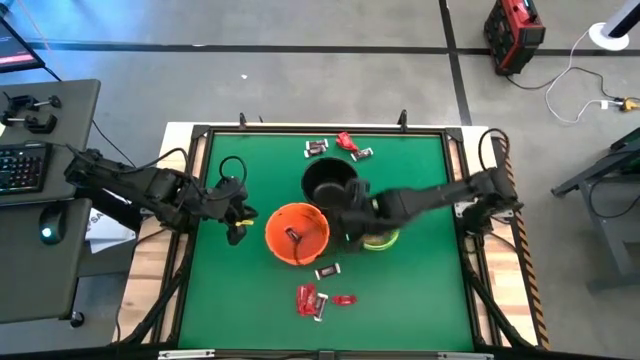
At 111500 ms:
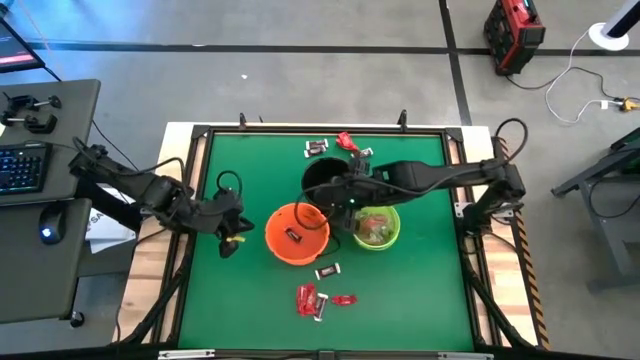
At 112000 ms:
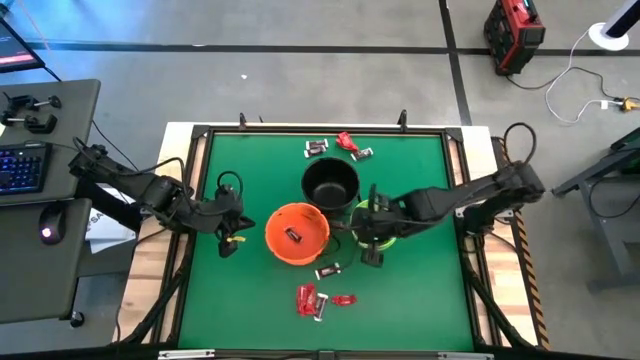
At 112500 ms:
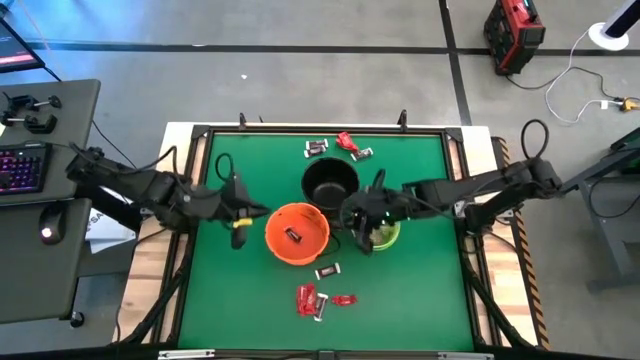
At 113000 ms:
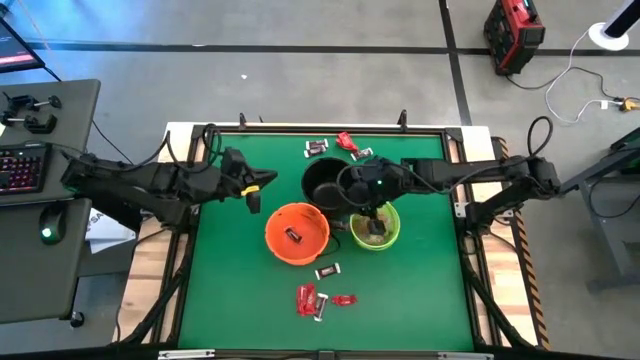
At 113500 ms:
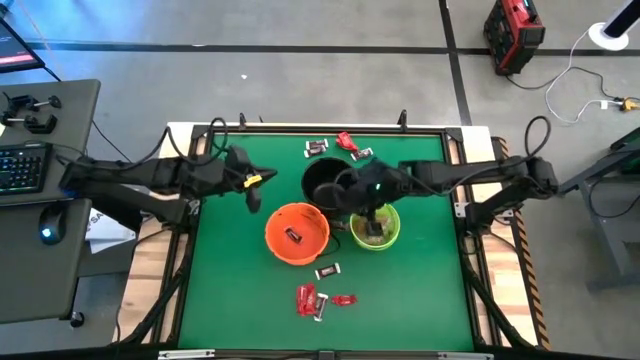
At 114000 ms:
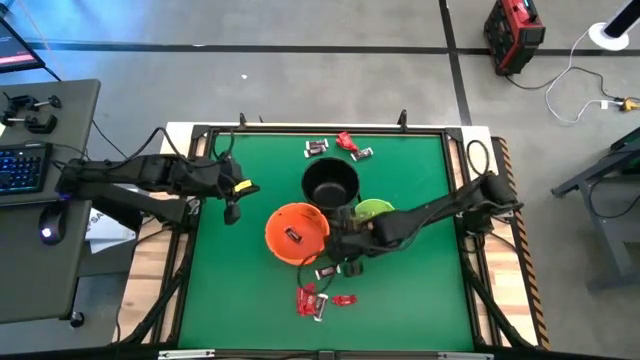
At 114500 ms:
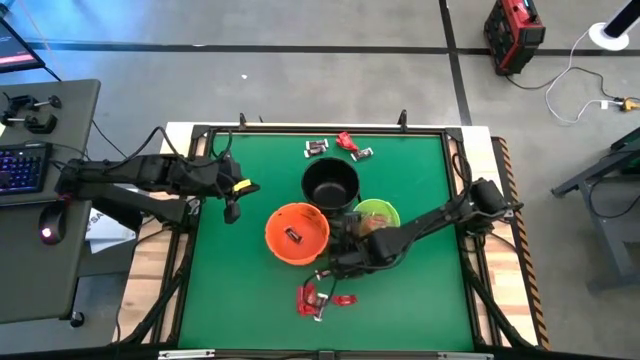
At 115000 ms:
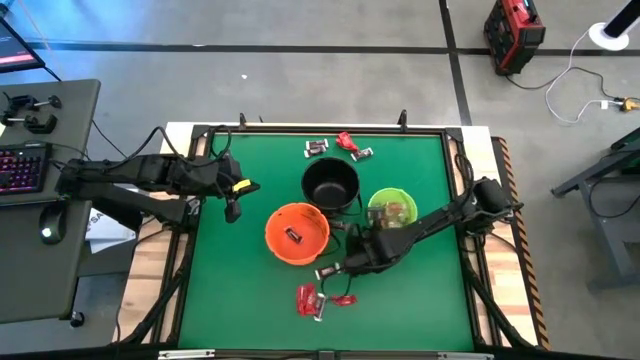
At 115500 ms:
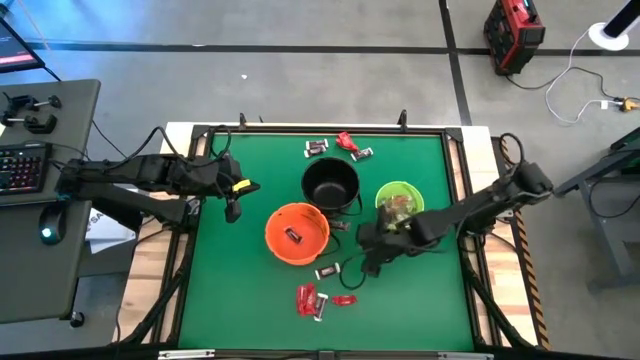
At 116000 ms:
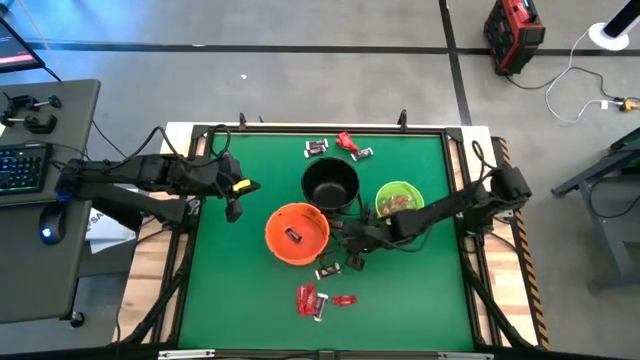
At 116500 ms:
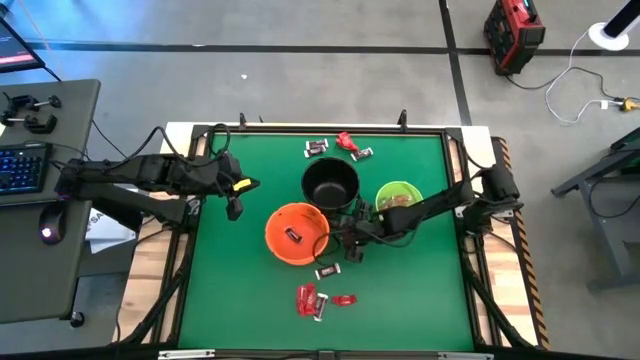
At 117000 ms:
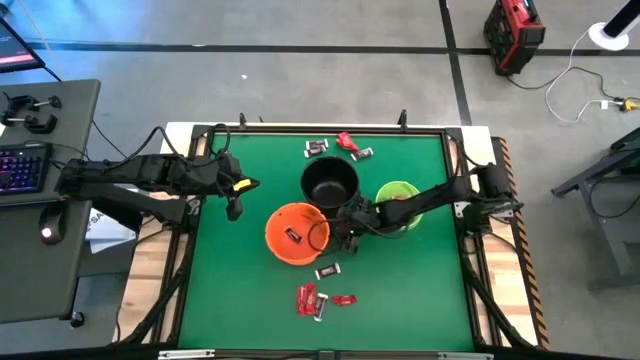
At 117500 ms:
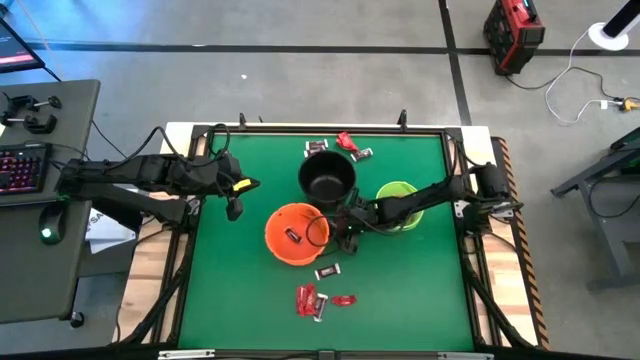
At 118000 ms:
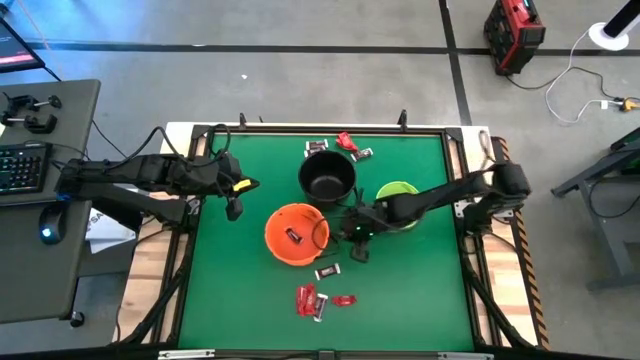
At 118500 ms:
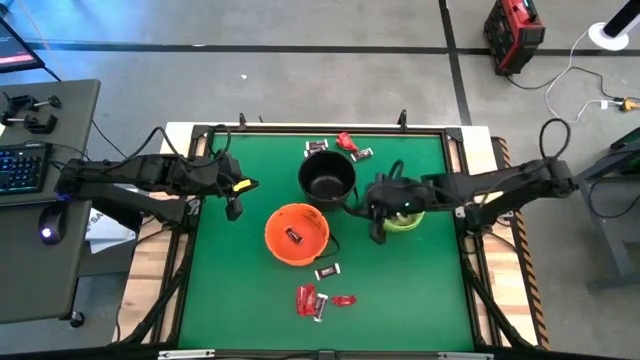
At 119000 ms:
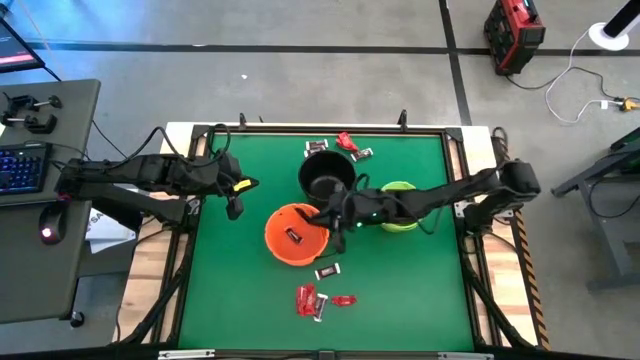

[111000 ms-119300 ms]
Task: Sort candy by brand, put in halloween buckets
Put the brown chocolate bar into orange bucket

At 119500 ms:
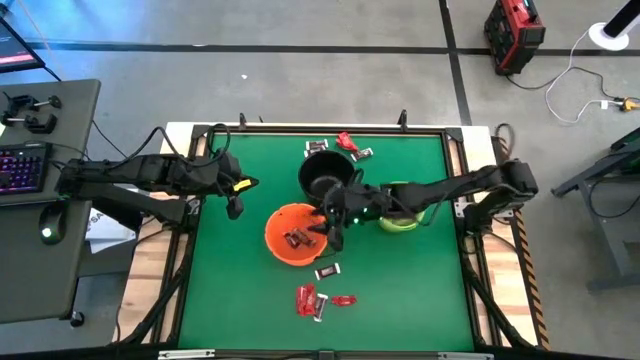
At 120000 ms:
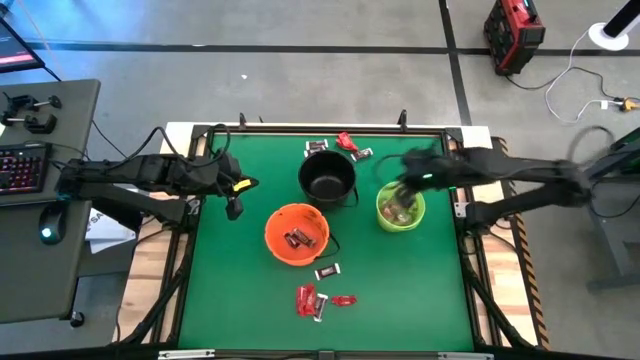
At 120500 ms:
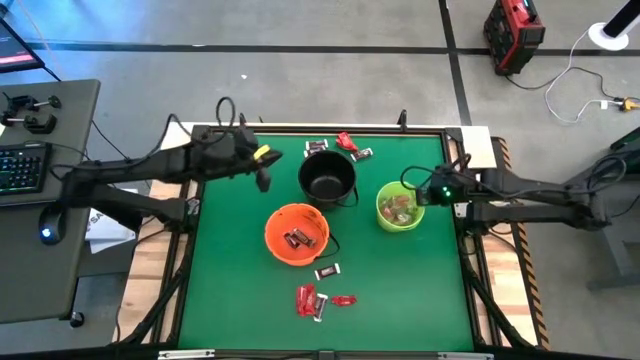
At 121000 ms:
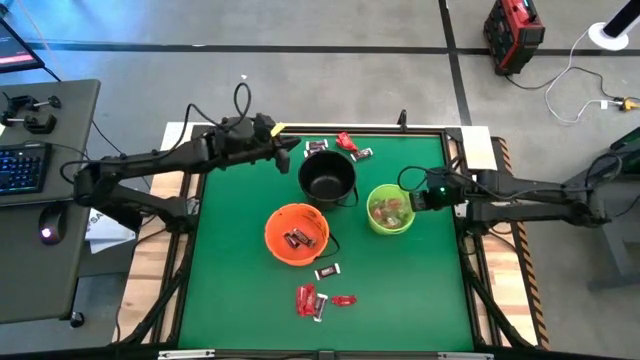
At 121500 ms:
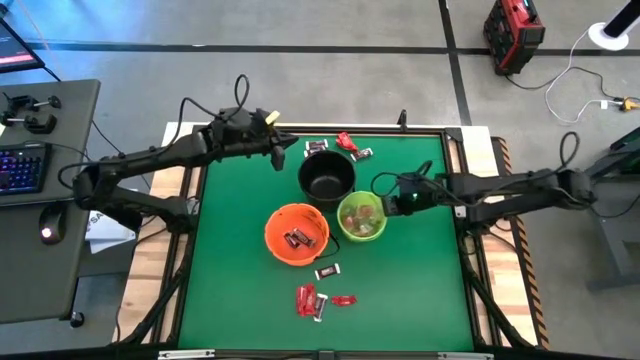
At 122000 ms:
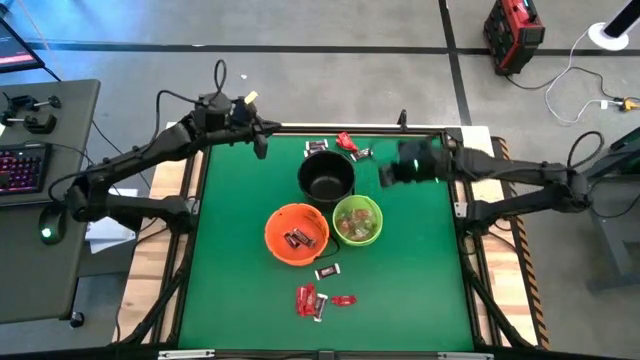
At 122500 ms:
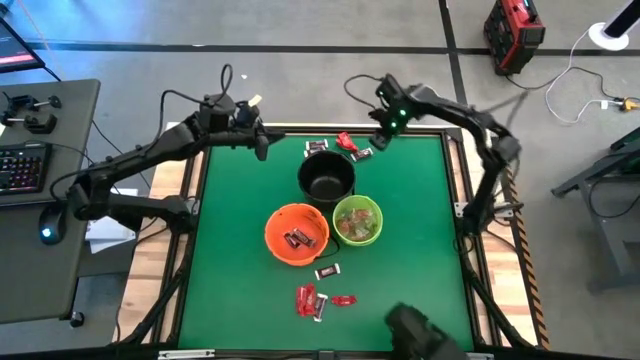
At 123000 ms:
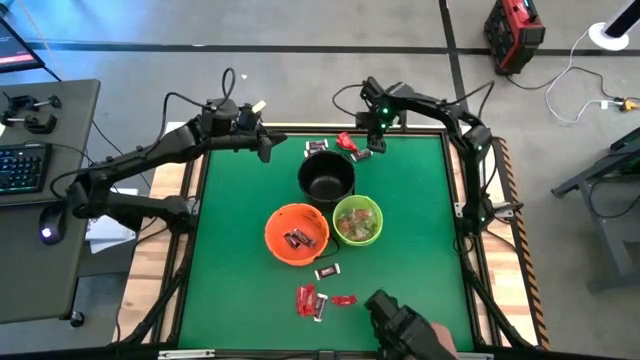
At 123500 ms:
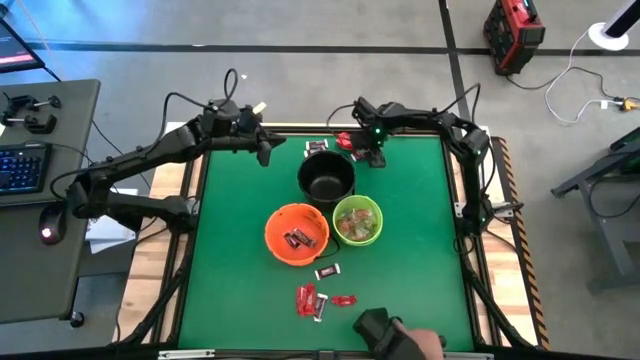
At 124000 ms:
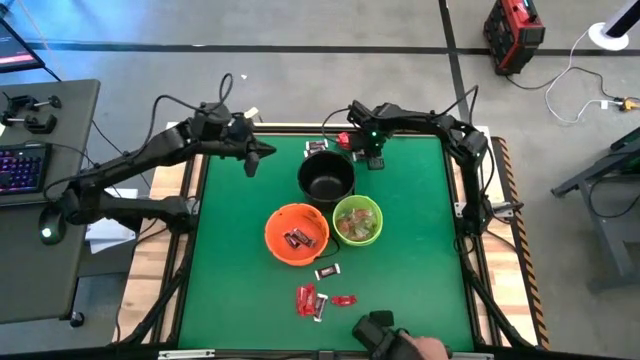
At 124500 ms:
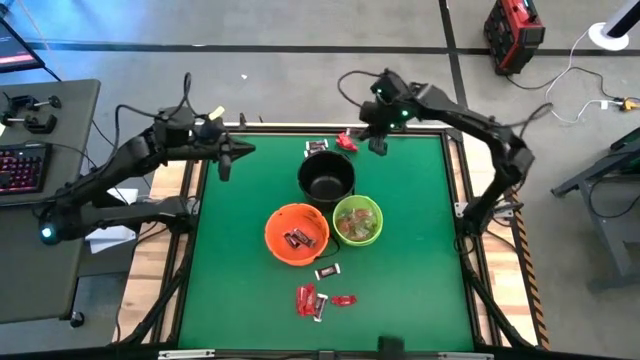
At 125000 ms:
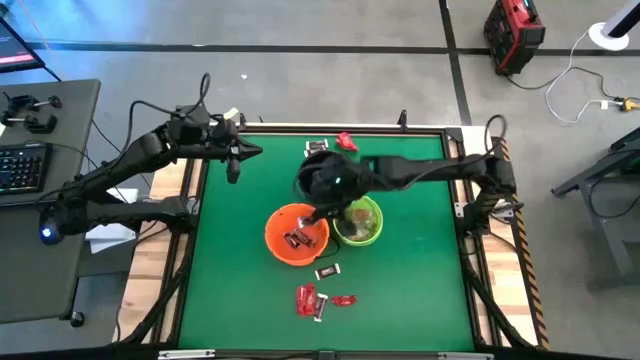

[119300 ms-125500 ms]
Put the brown chocolate bar into orange bucket

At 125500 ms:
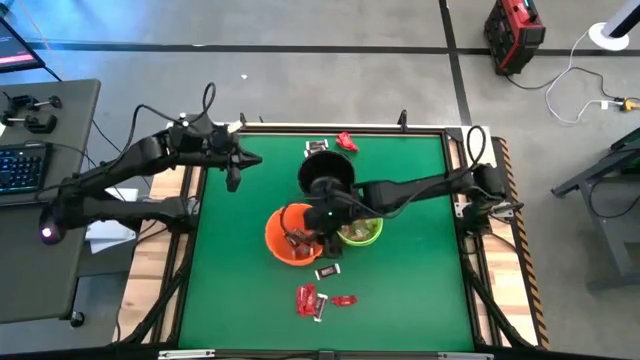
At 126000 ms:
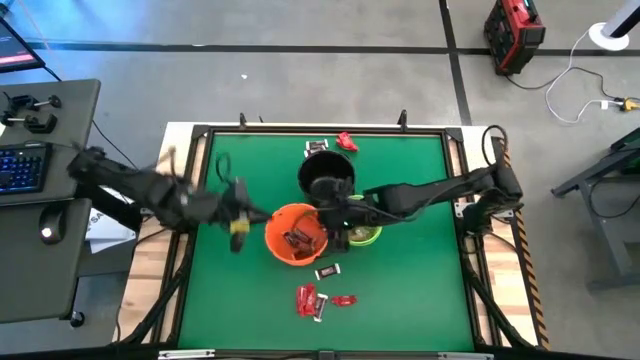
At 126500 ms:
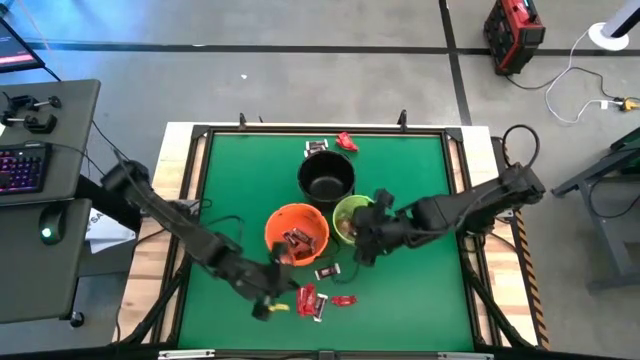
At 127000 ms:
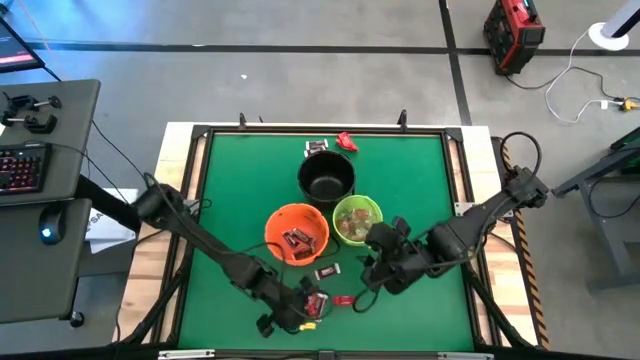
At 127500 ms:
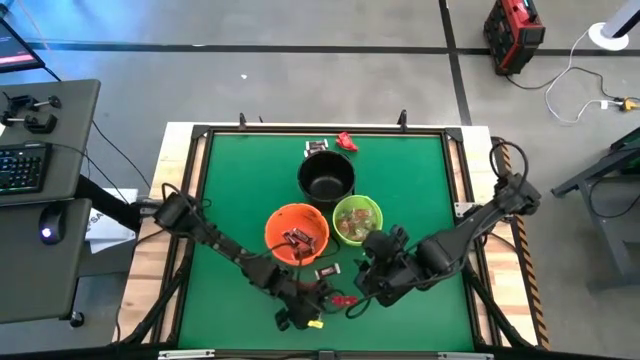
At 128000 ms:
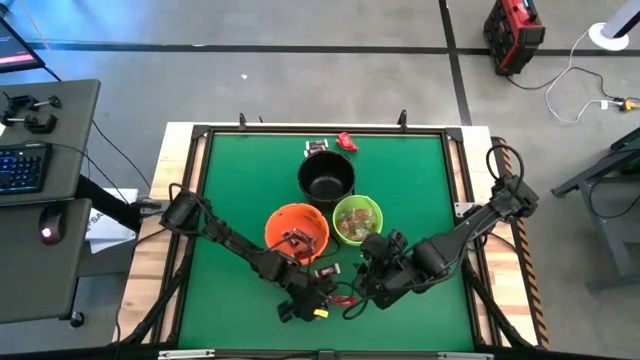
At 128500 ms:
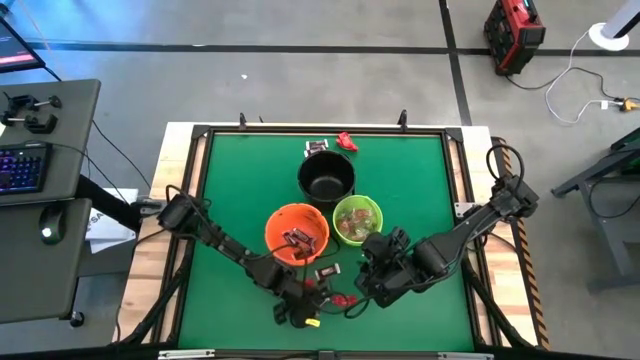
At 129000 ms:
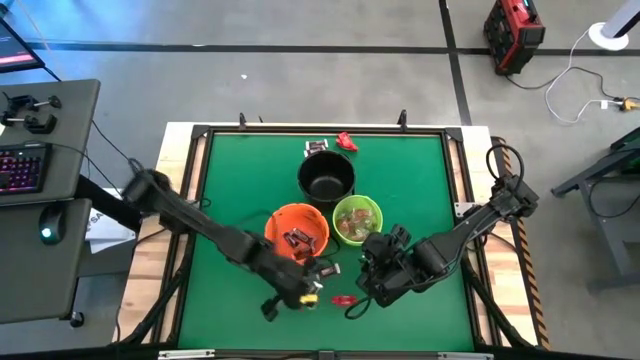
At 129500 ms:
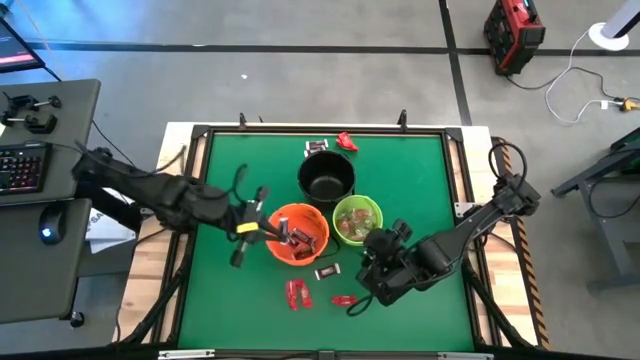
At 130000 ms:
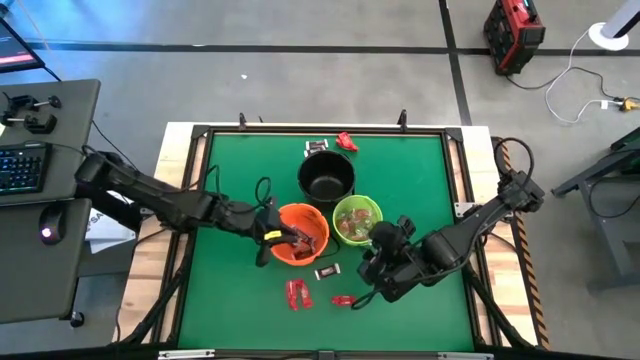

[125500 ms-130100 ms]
Put the brown chocolate bar into orange bucket

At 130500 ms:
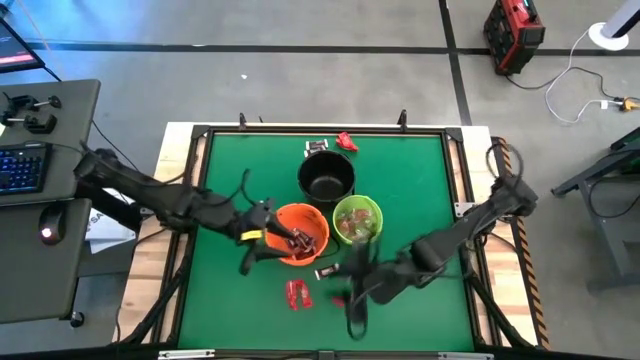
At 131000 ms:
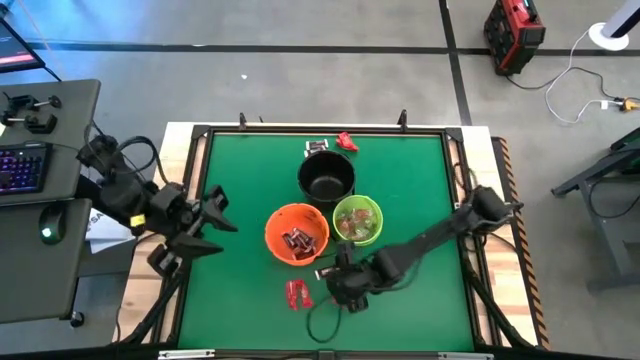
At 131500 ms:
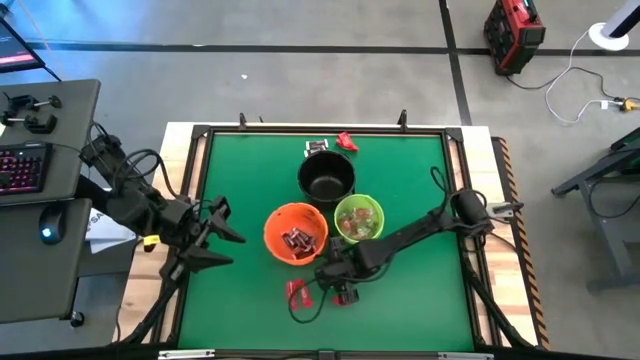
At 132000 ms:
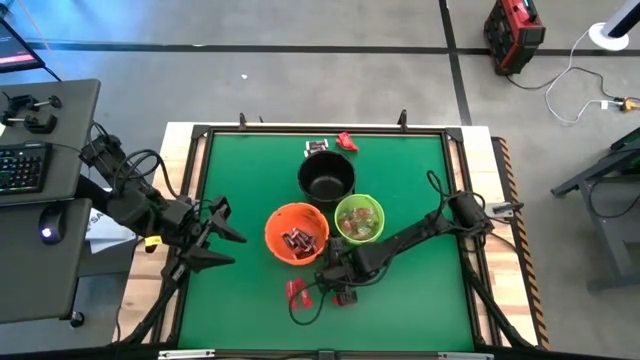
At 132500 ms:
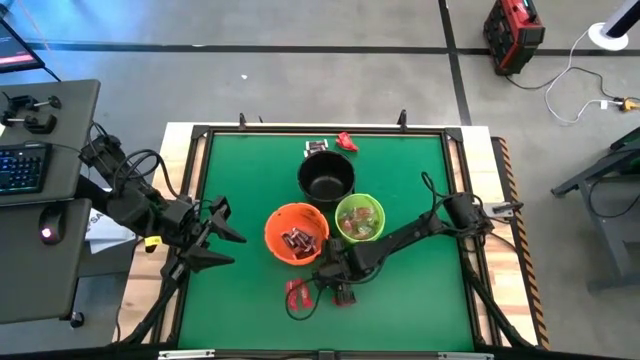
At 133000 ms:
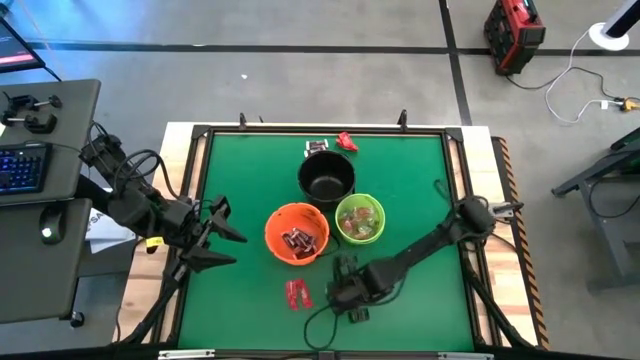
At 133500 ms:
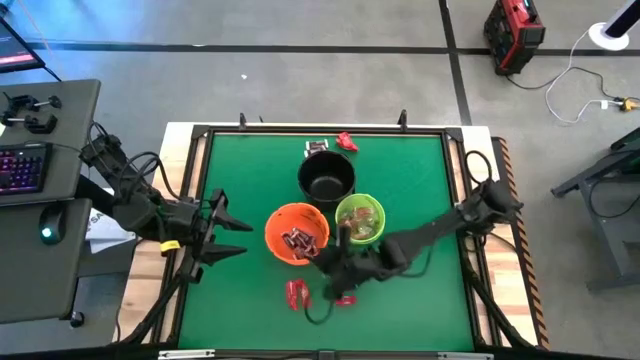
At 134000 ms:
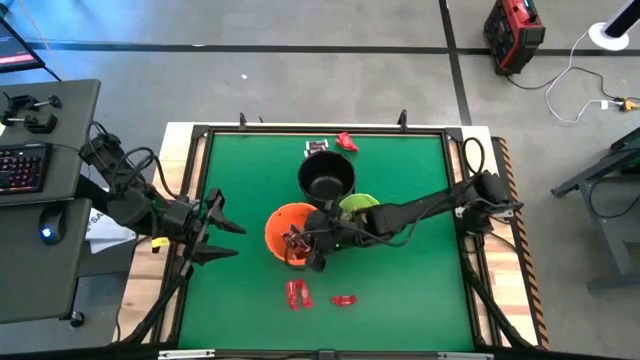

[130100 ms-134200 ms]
Put the brown chocolate bar into orange bucket
